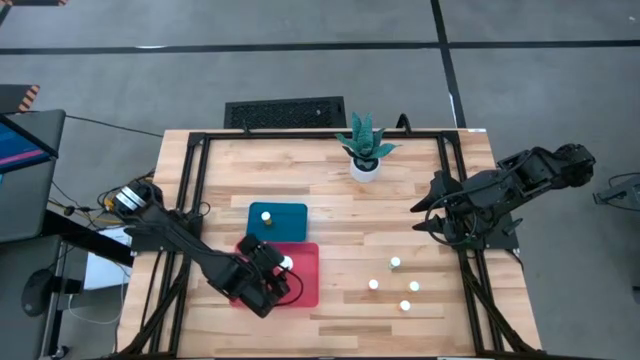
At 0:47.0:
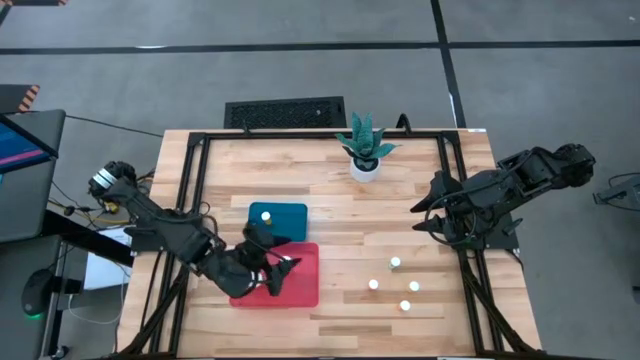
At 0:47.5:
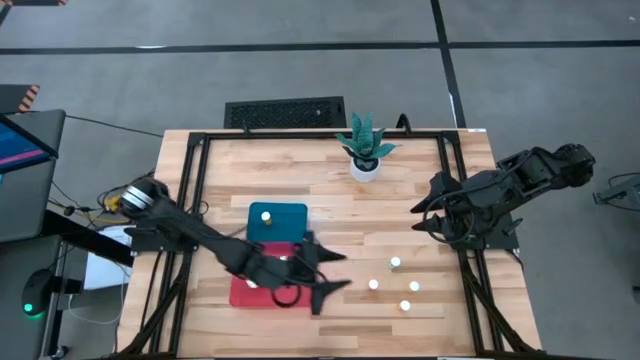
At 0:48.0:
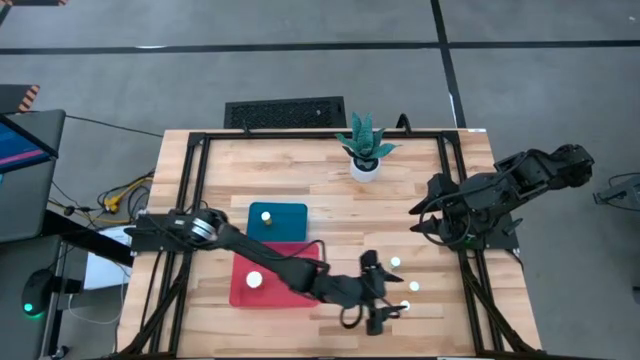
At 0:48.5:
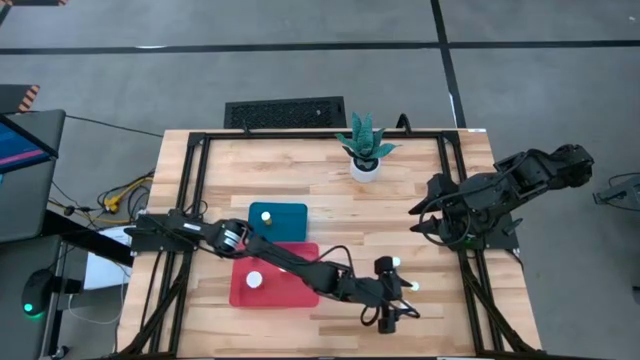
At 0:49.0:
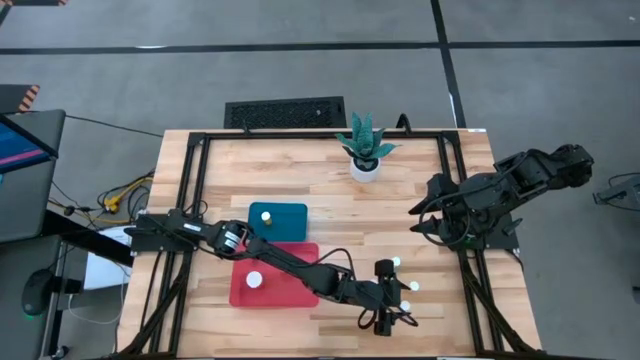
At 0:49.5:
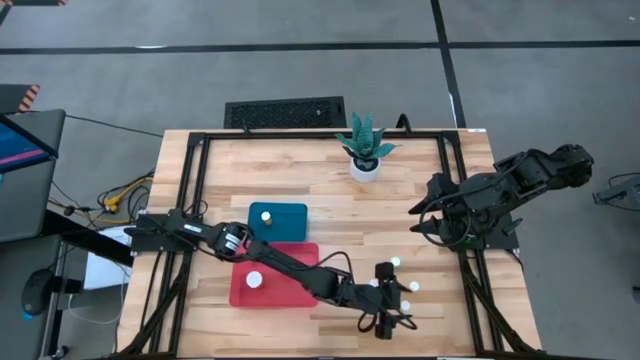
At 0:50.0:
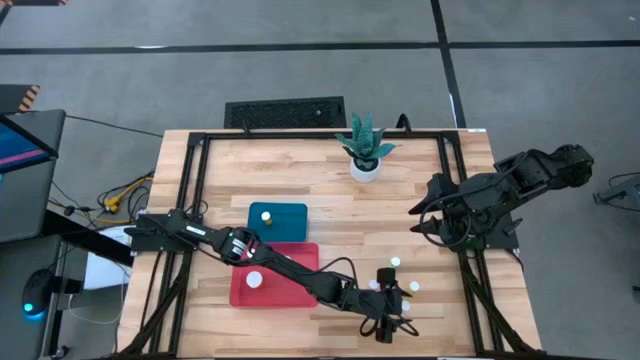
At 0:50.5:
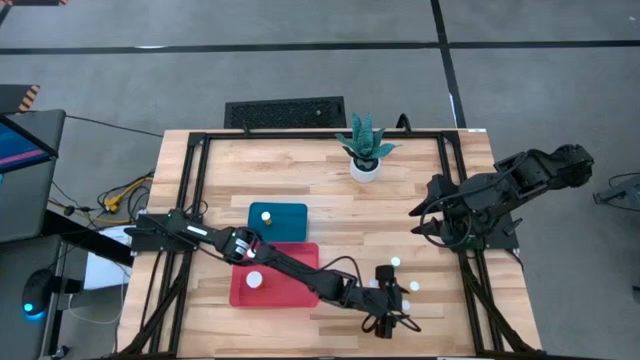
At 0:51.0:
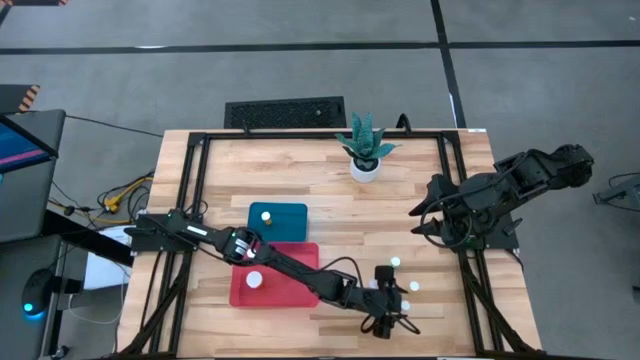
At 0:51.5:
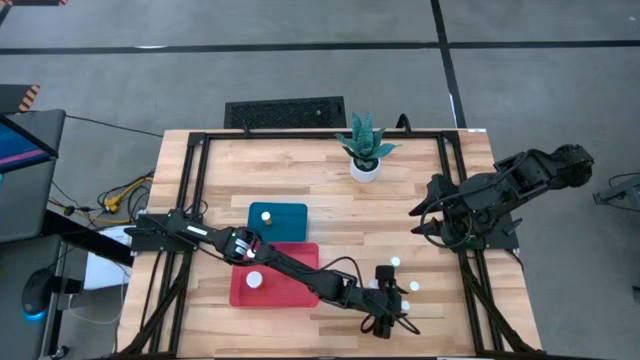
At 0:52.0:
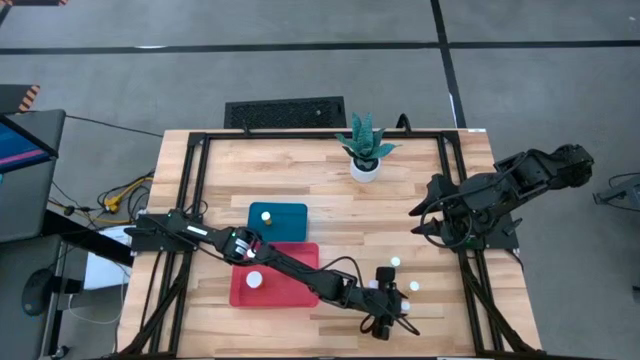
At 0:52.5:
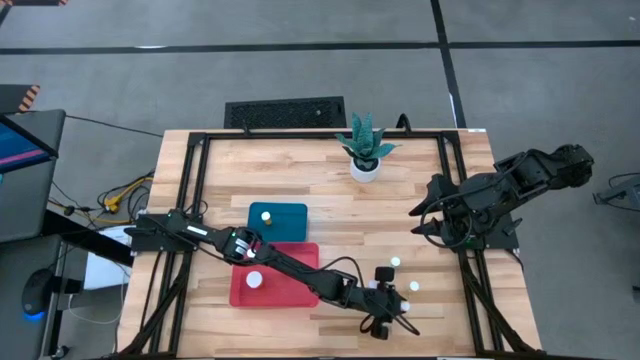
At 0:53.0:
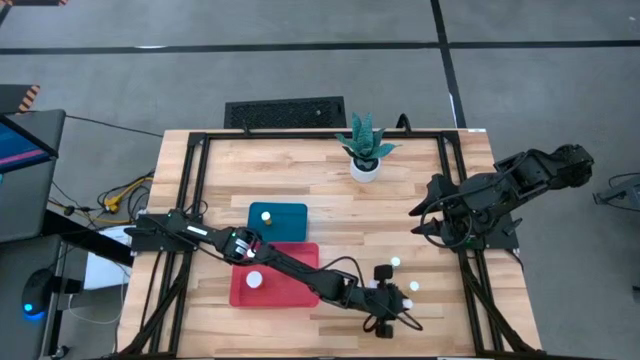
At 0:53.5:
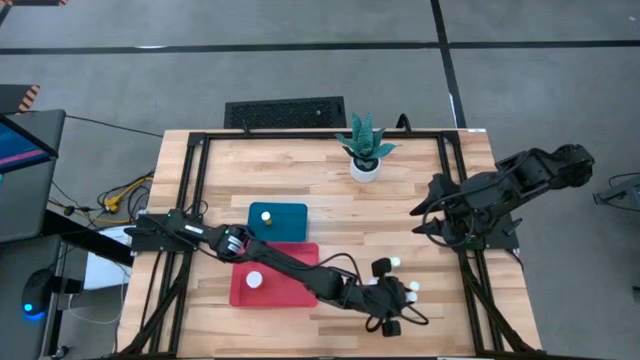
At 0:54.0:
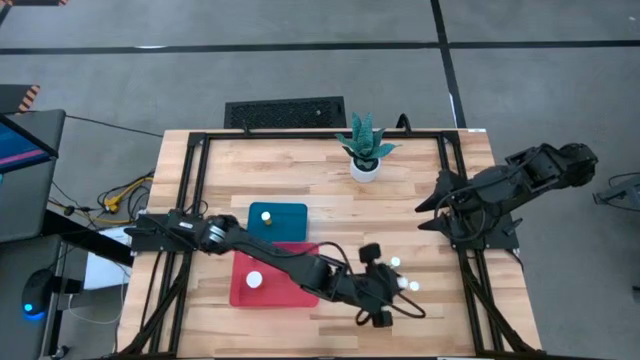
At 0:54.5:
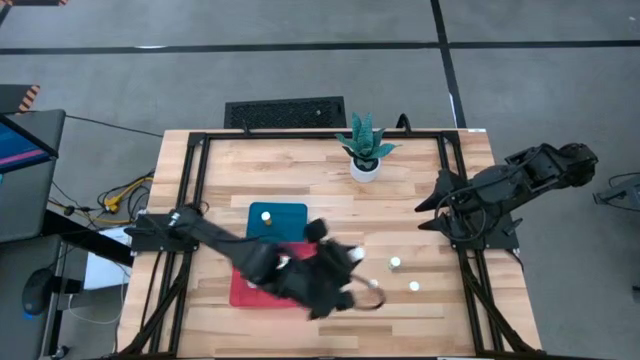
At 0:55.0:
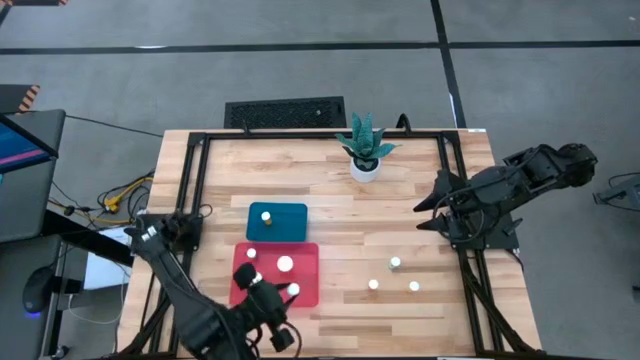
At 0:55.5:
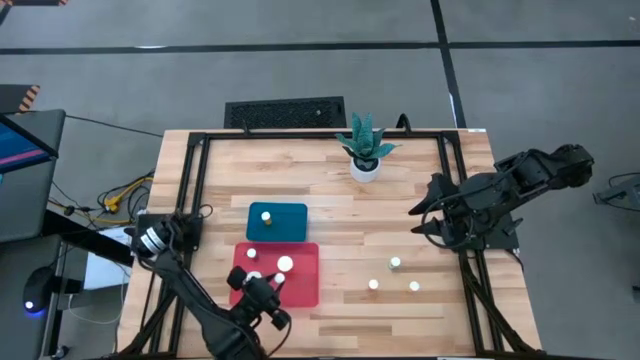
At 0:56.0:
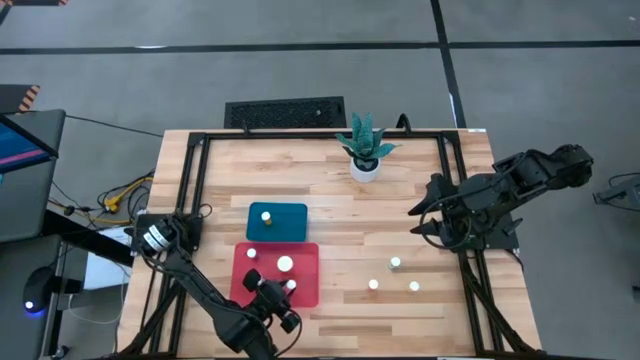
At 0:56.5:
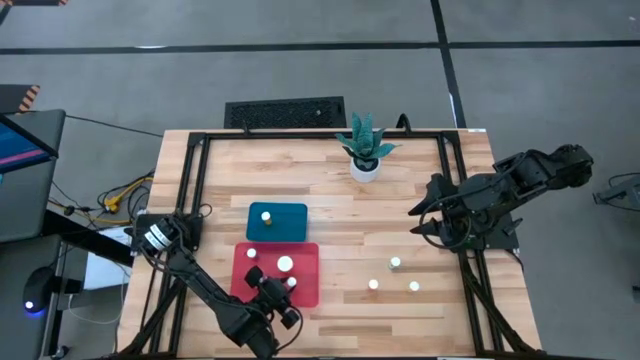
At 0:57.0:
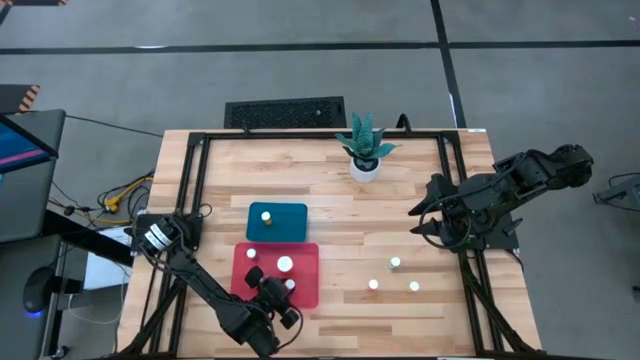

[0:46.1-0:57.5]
Task: Pick and place medicine bottles into bin by pill shape (circle, oval)
Put the small orange capsule bottle into the red bin

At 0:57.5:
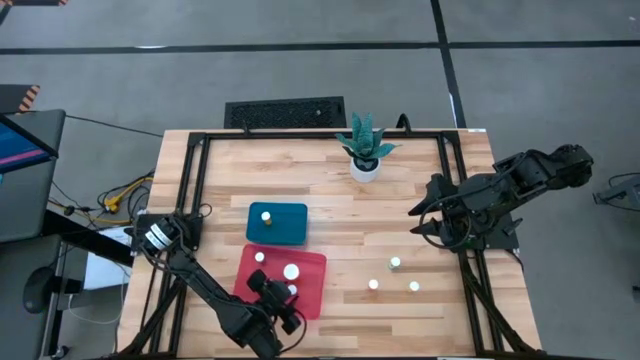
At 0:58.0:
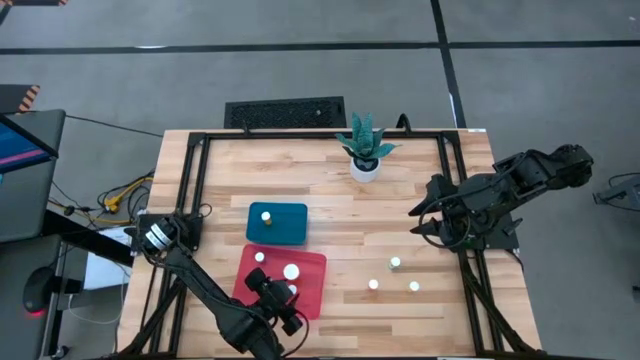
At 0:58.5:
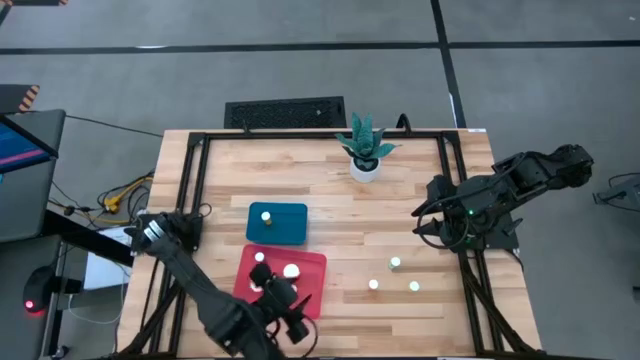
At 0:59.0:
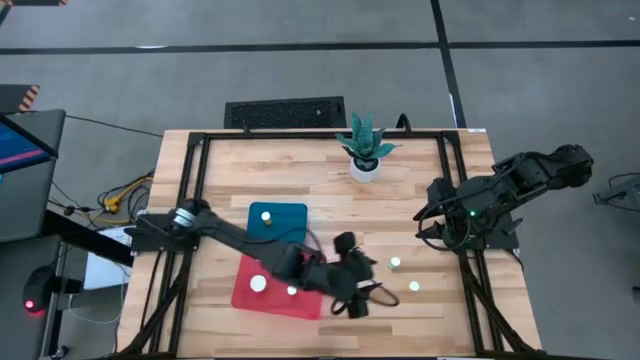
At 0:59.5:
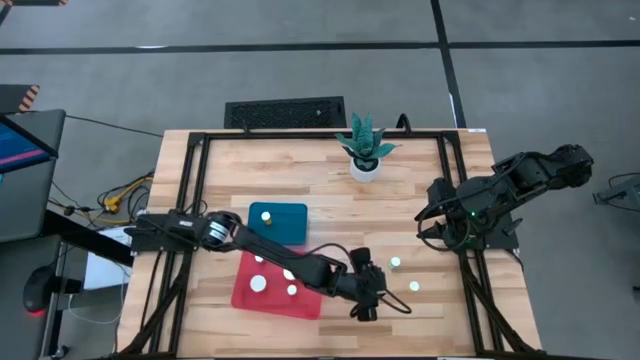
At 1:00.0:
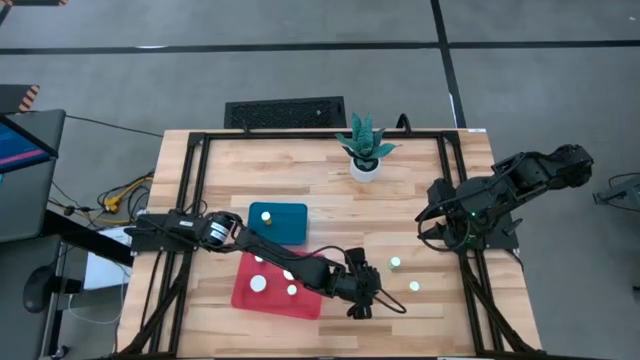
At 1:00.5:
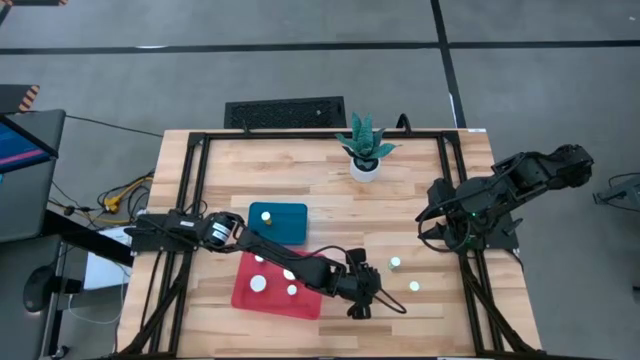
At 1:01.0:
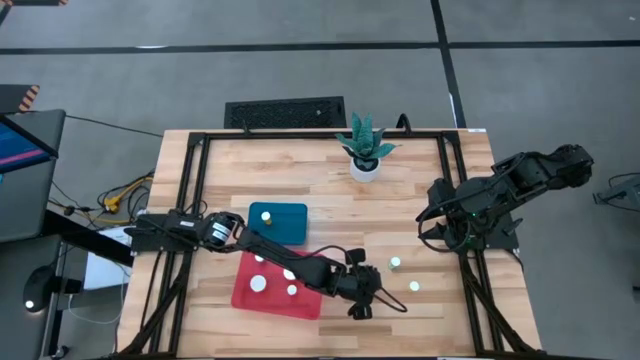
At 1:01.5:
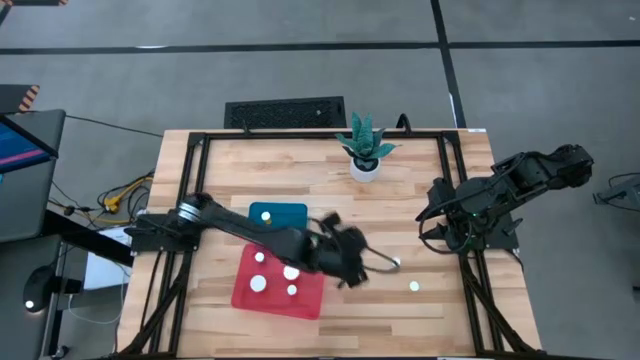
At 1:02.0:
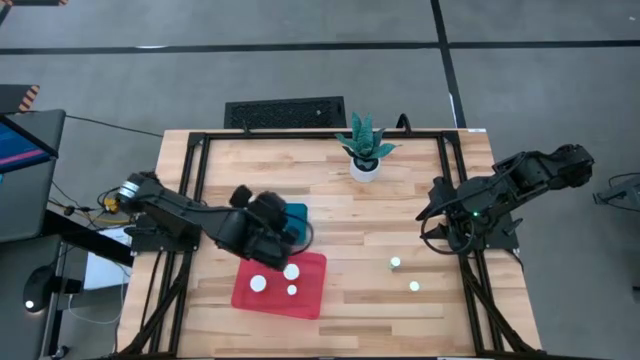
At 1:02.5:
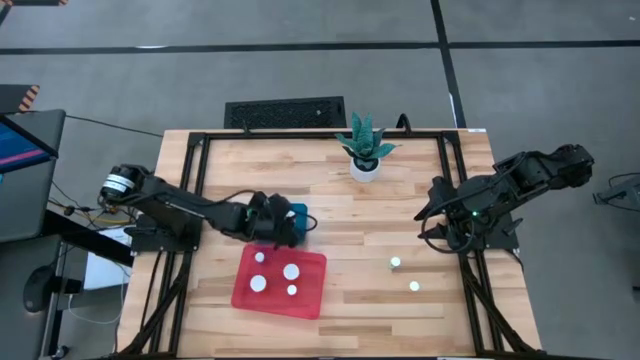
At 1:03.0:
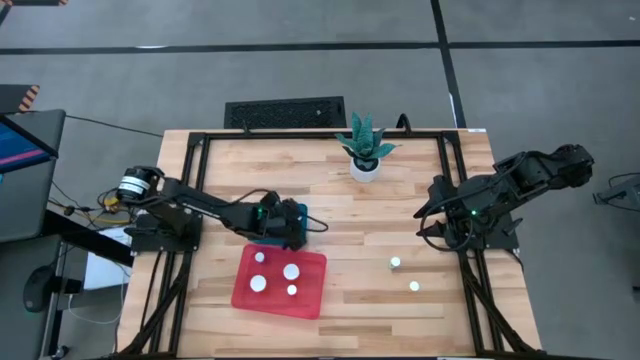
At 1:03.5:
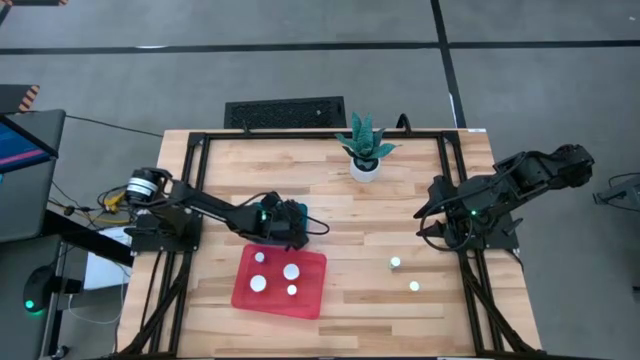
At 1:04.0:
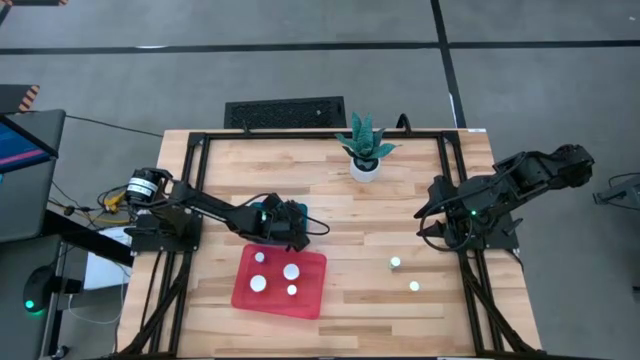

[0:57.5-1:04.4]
Put the pink tablet bottle into the blue bin

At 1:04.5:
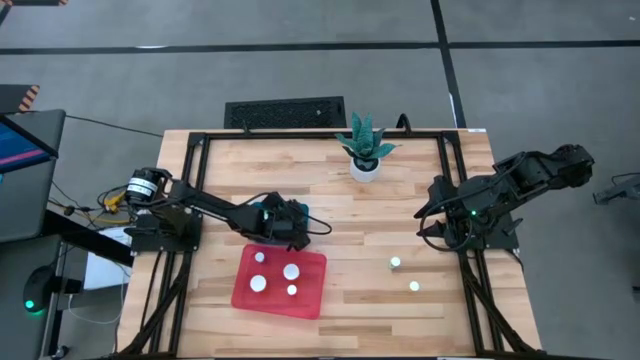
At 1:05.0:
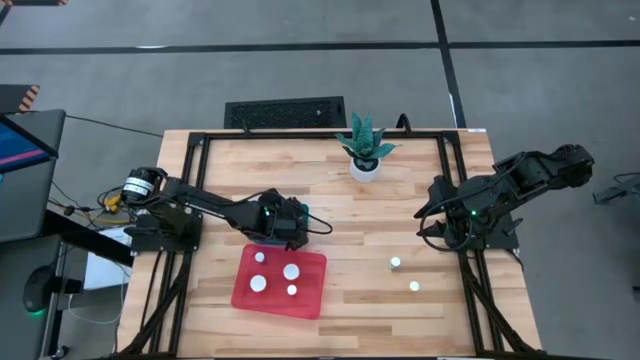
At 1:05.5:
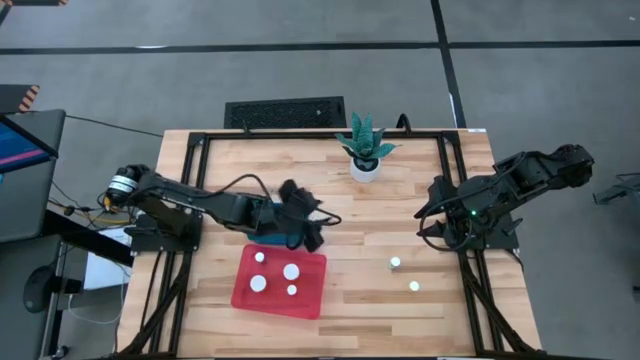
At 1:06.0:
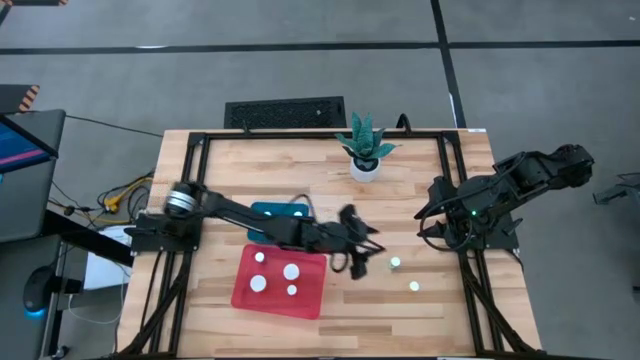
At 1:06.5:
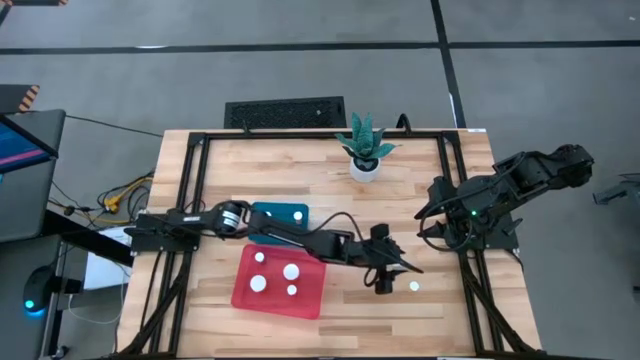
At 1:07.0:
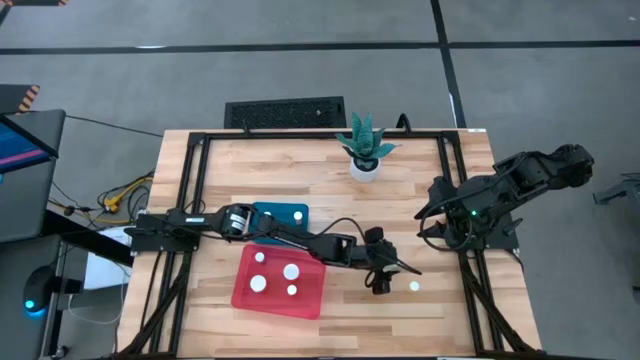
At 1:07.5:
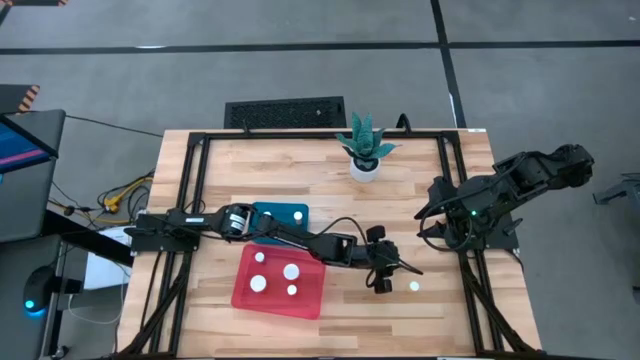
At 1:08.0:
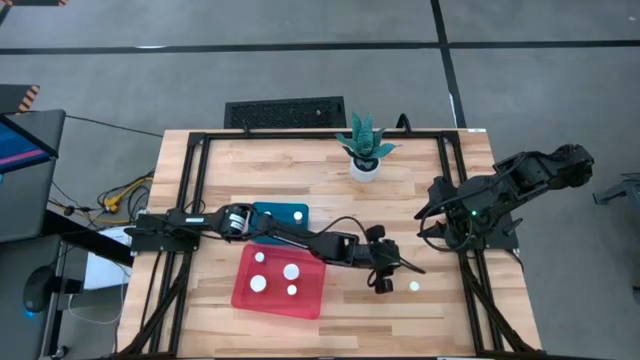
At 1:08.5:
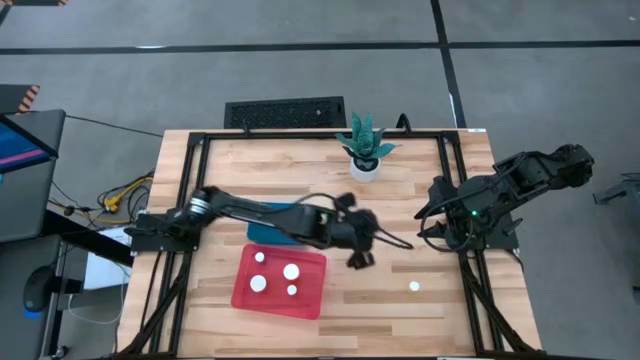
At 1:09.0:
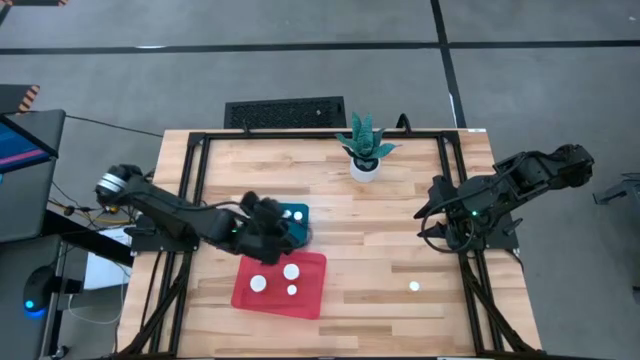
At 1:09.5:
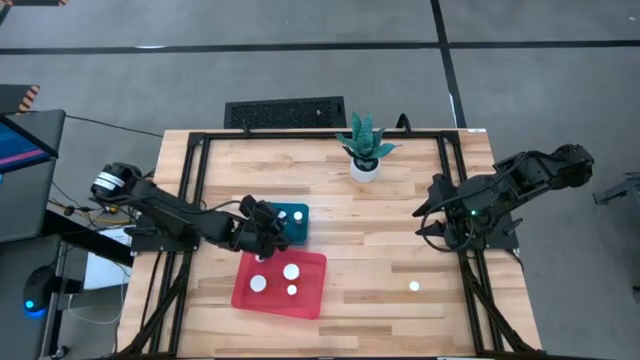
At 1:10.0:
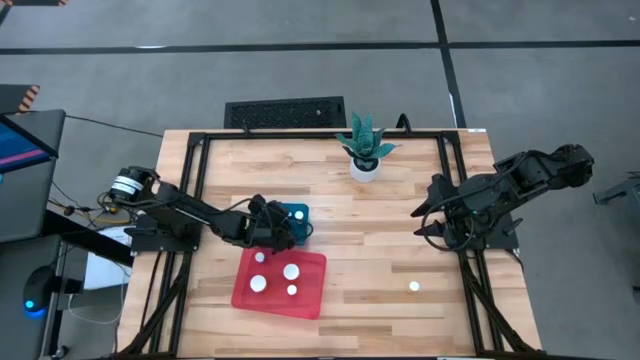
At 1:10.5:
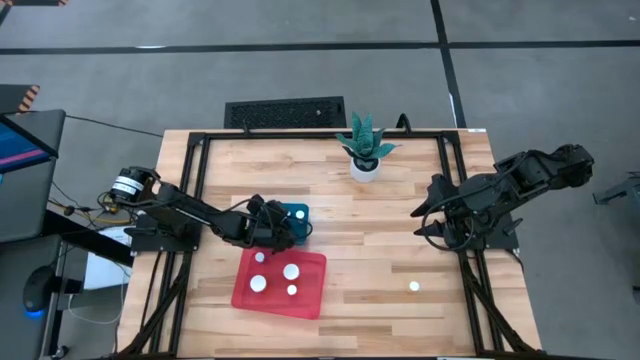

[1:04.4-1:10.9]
Put the blue tablet bottle into the blue bin
